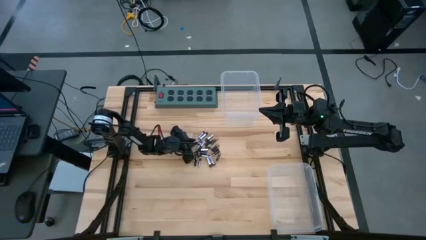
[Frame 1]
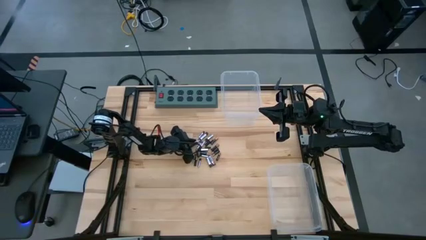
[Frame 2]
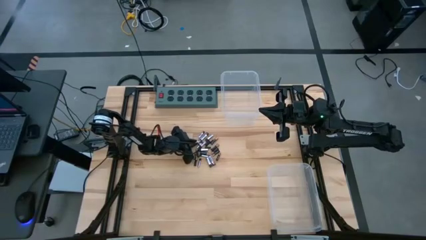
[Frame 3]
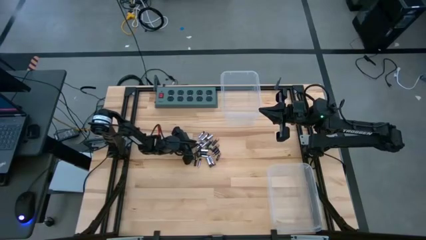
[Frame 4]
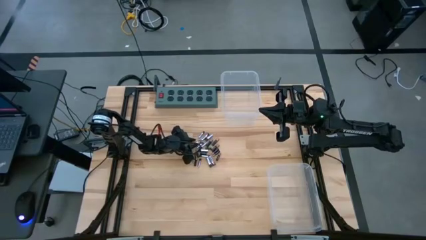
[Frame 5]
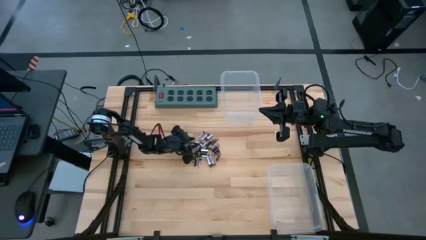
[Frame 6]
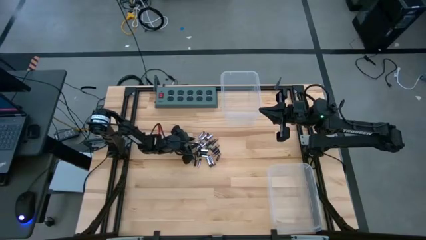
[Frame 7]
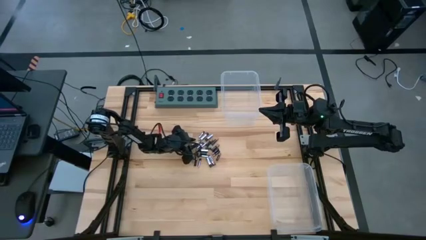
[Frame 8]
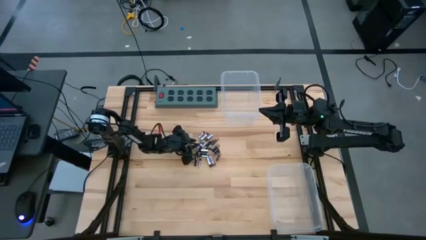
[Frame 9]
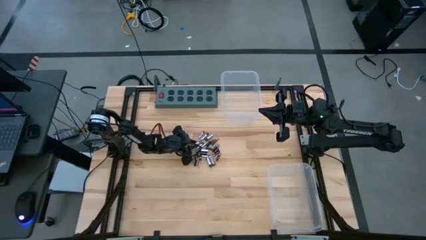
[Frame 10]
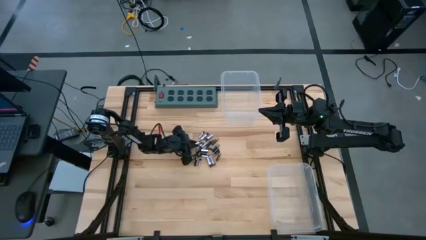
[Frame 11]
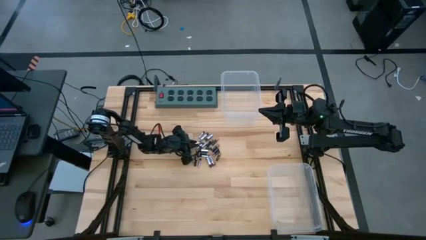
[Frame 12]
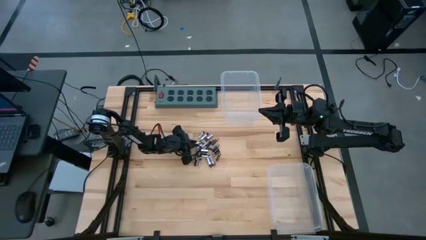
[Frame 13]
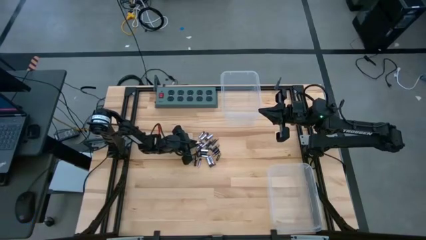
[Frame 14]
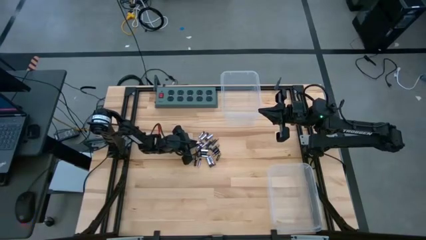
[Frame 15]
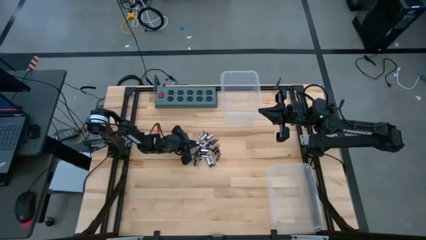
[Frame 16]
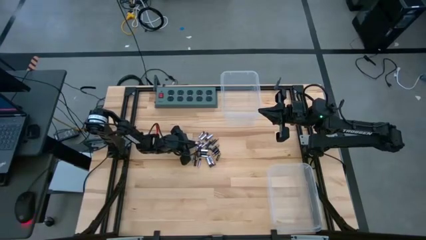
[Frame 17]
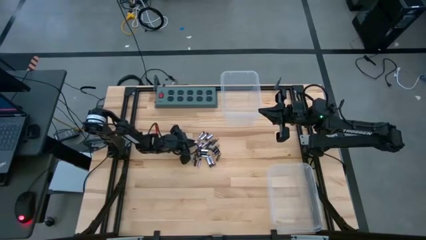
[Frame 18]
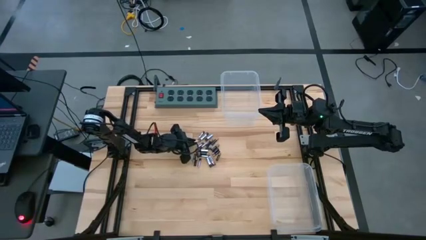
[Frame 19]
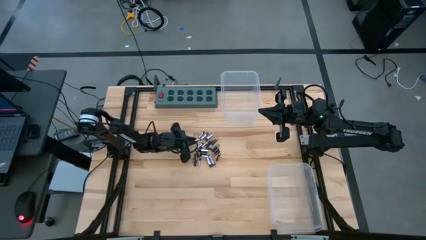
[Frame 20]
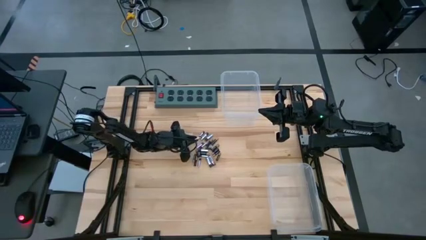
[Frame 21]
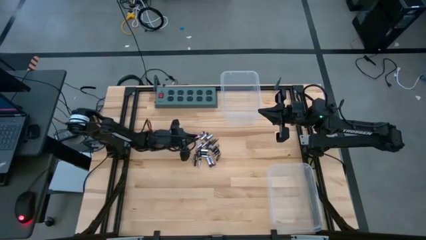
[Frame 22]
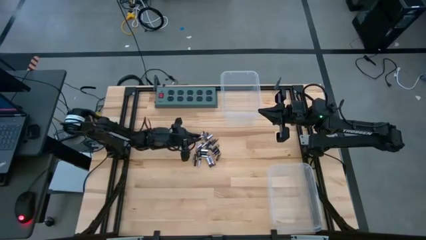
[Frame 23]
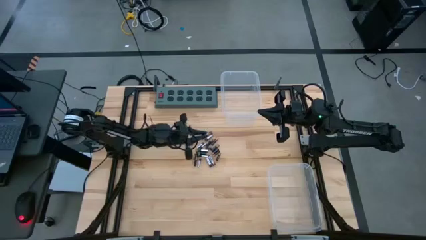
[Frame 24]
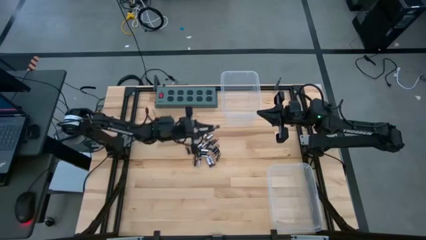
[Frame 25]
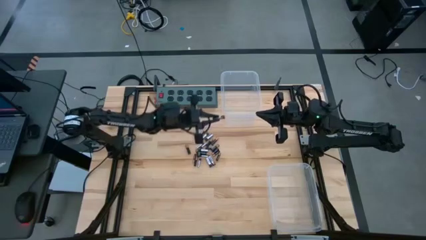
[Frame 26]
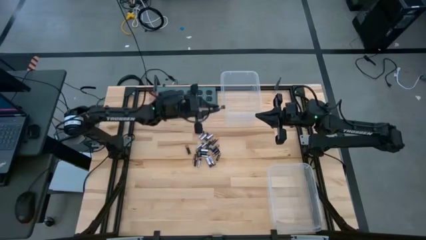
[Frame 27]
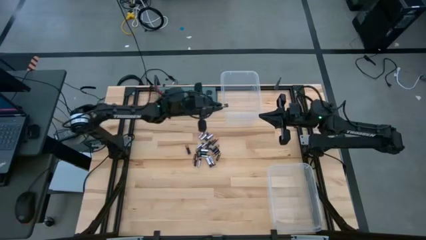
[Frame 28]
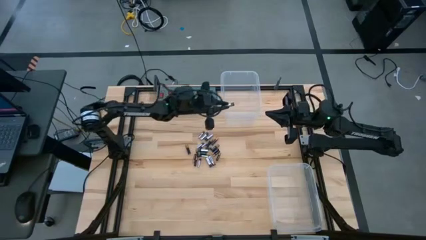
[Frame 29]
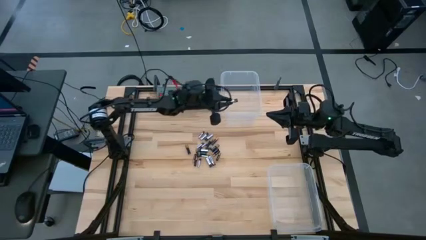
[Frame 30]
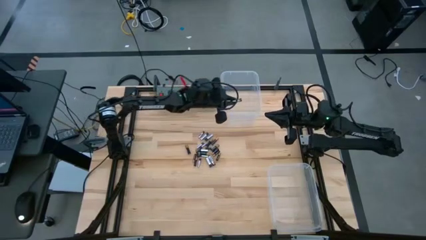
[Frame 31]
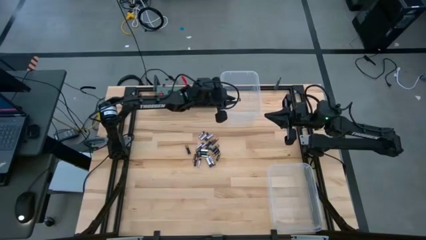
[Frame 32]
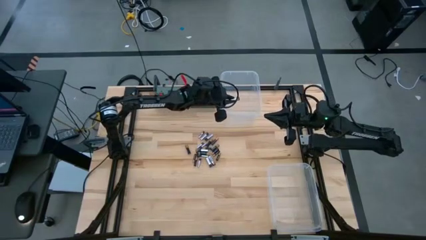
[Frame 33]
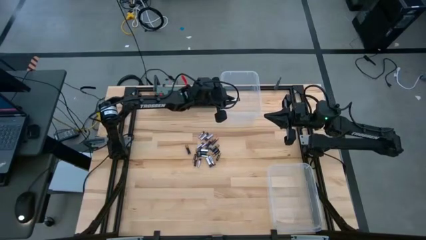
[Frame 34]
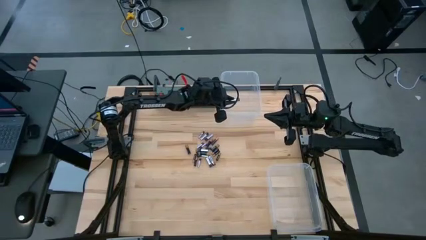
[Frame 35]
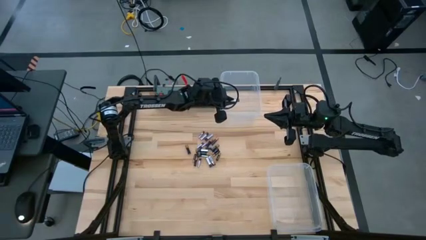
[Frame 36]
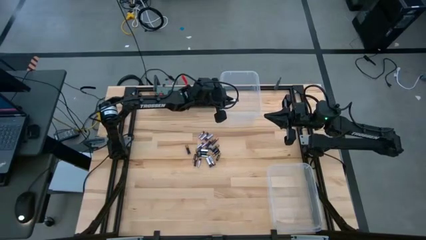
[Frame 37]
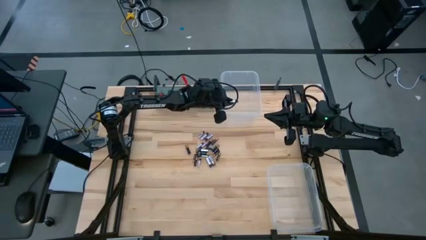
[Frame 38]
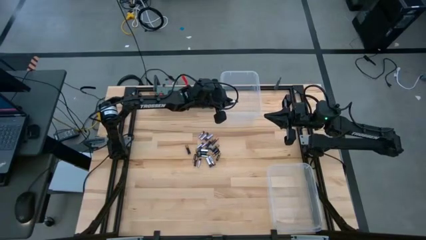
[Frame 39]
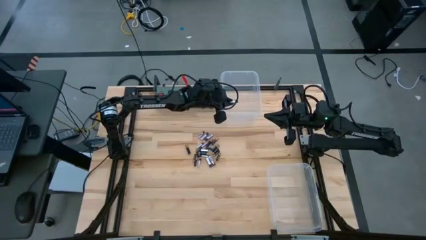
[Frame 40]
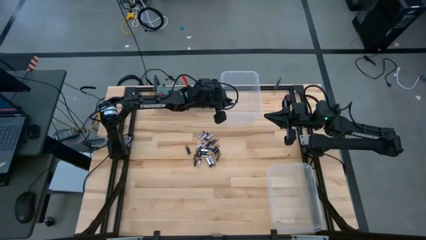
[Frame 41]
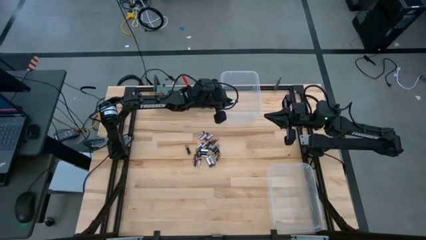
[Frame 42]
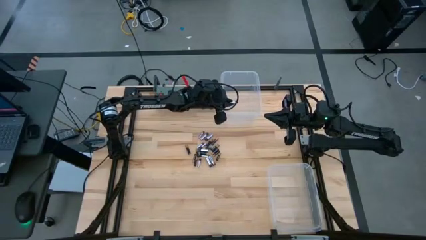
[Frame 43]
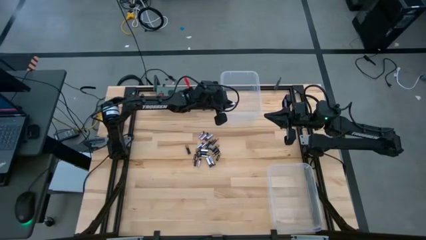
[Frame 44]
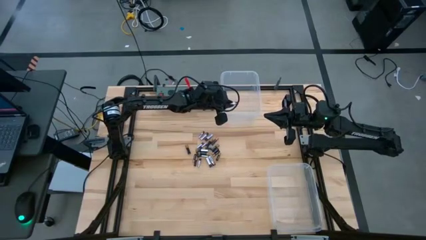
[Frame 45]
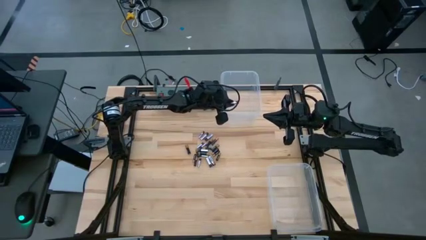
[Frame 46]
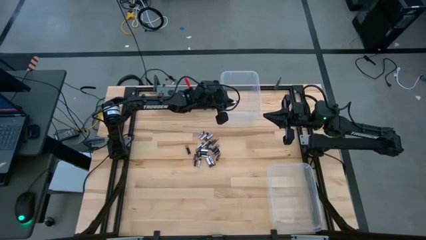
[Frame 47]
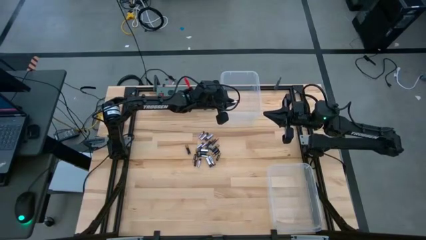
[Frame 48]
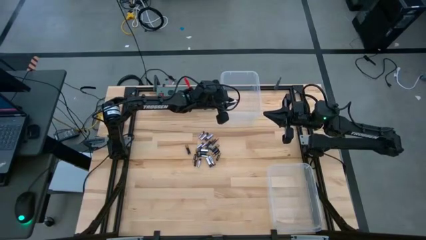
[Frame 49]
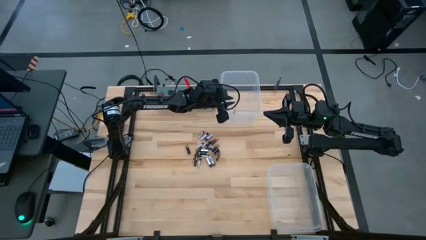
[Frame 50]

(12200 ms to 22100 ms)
Task: Sort batteries
Put the silver battery into the top transparent bin

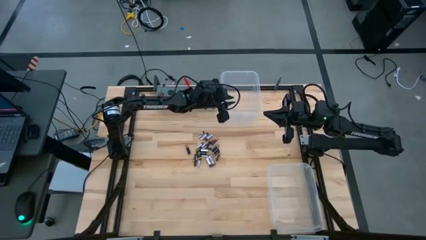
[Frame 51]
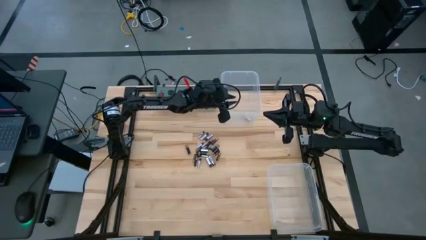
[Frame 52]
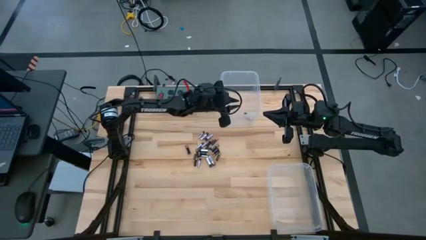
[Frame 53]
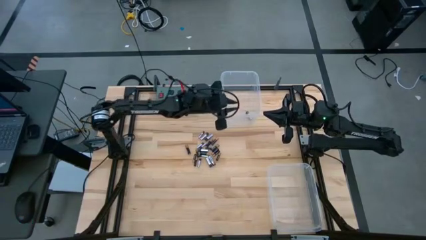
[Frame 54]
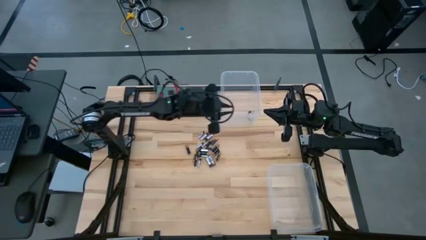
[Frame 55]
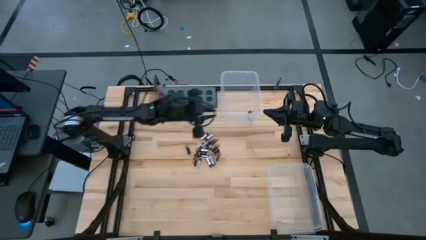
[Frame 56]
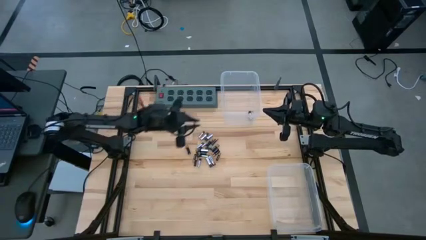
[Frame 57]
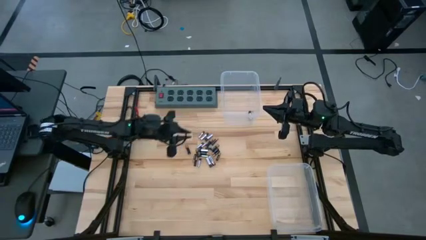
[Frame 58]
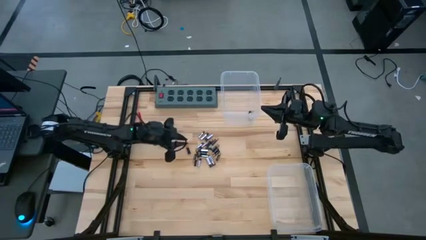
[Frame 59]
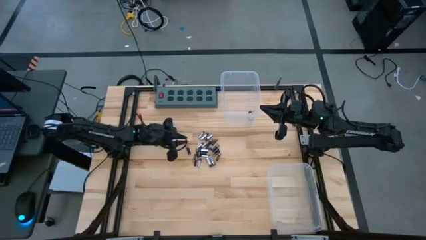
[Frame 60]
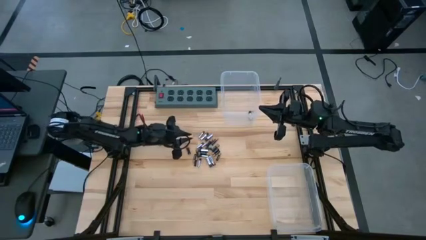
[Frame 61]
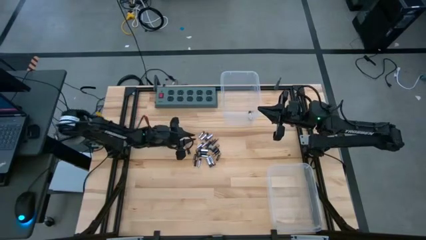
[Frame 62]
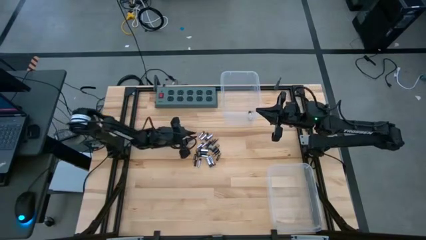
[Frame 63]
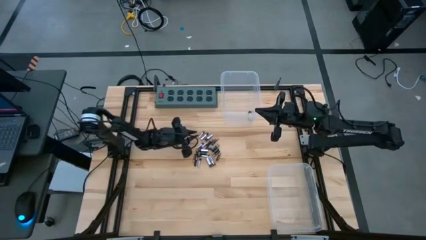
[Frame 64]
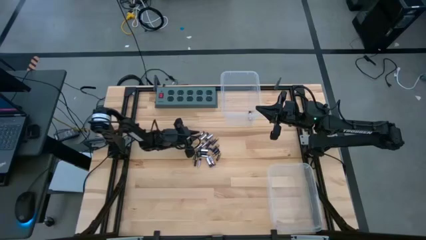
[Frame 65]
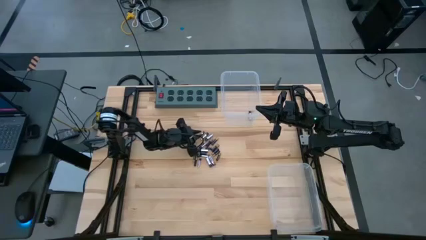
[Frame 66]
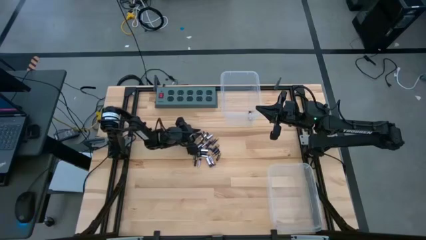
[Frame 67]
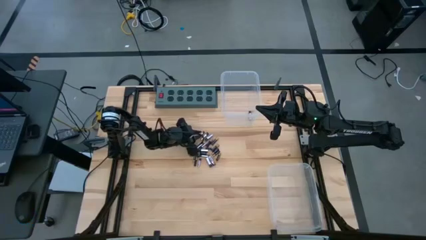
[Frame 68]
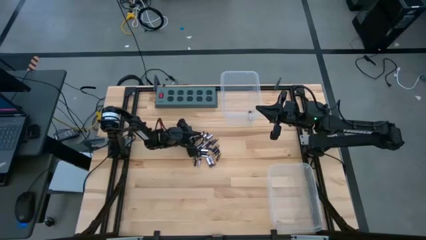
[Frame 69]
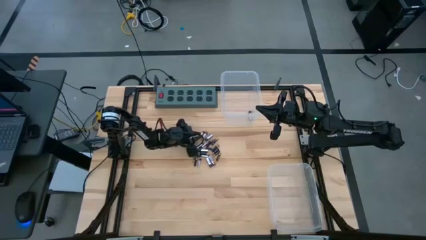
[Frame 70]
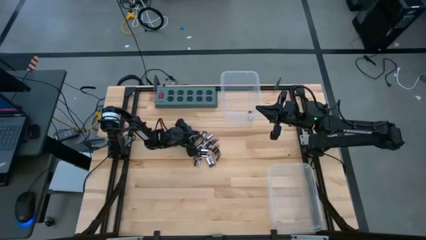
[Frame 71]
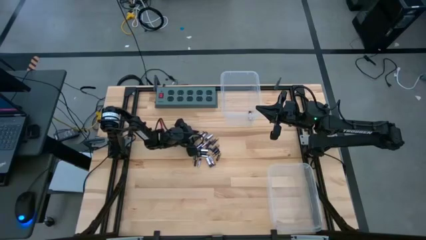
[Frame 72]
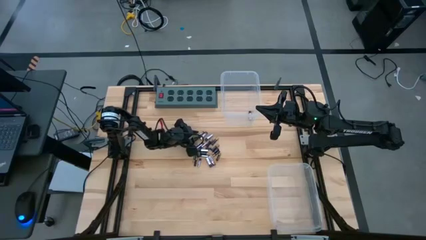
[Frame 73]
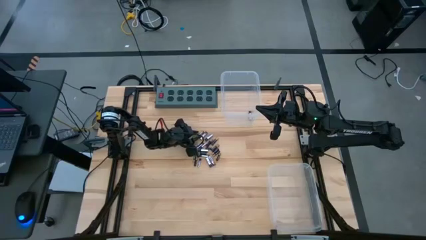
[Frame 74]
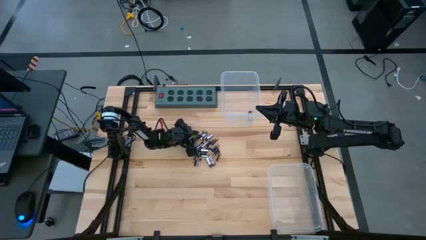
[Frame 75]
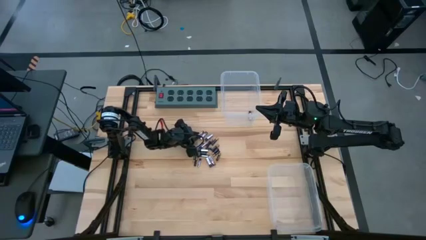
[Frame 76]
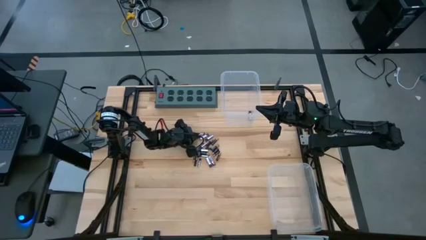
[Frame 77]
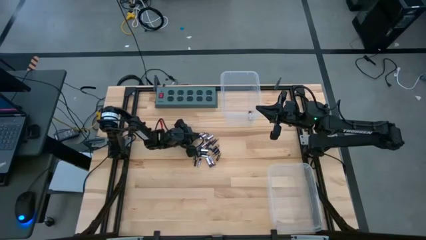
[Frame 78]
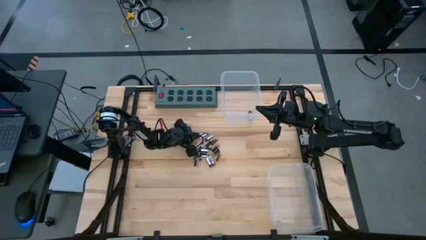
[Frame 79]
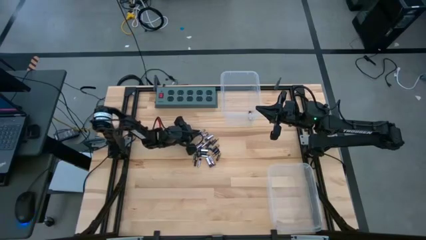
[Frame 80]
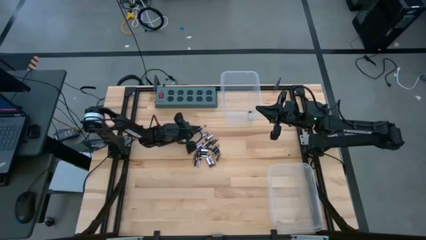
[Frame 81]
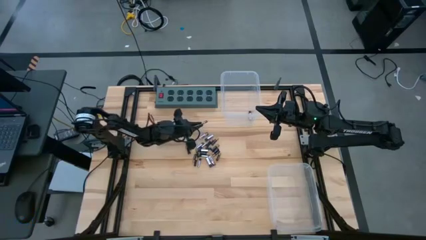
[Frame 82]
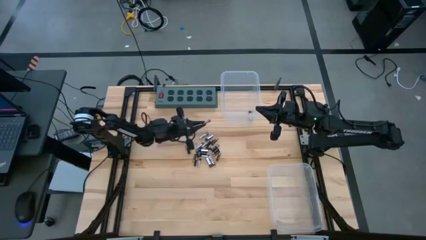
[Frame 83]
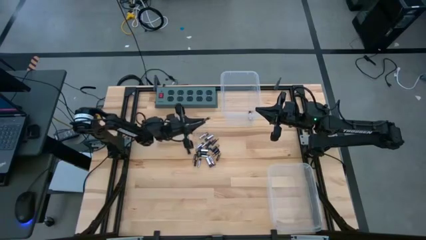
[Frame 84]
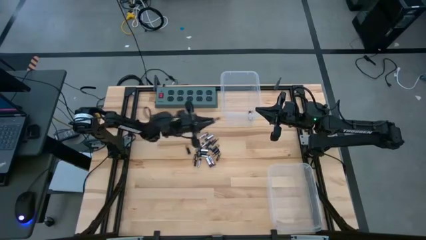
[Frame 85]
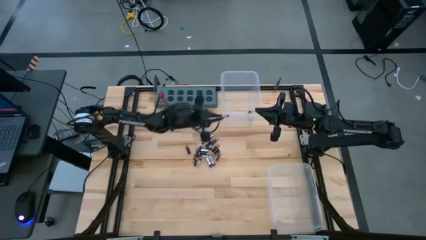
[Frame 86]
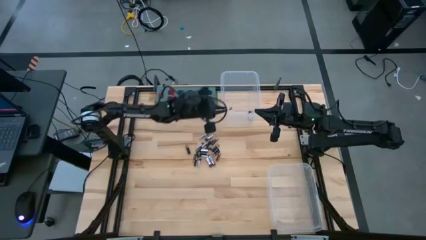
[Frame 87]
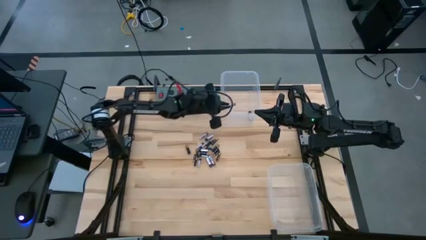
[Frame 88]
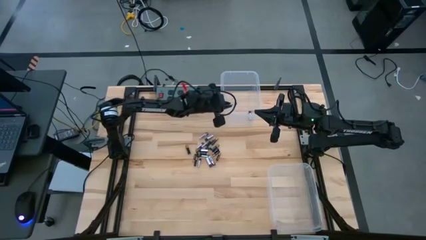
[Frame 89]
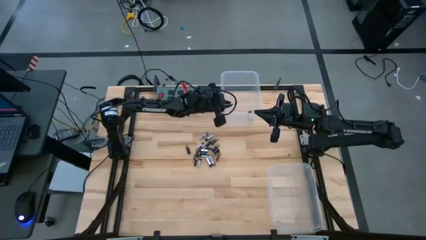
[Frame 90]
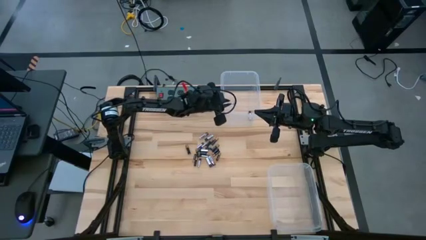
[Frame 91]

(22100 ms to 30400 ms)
Put the silver battery into the top transparent bin
